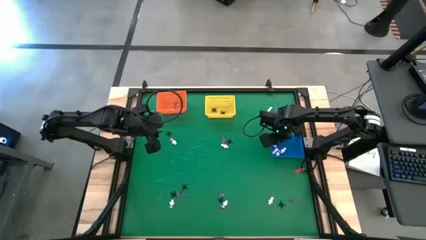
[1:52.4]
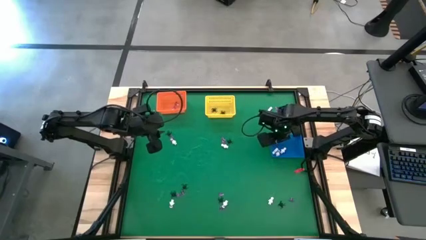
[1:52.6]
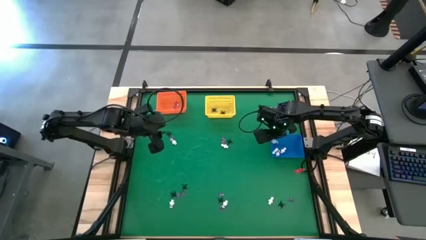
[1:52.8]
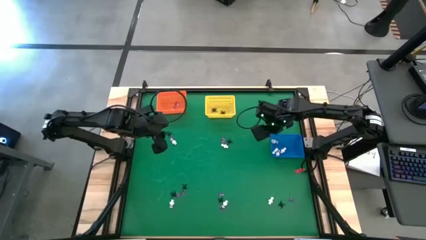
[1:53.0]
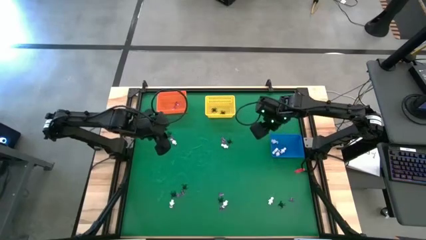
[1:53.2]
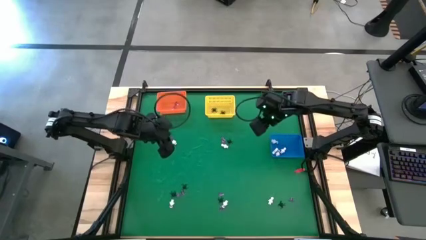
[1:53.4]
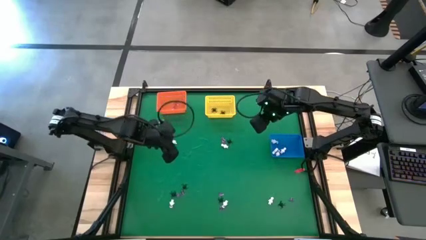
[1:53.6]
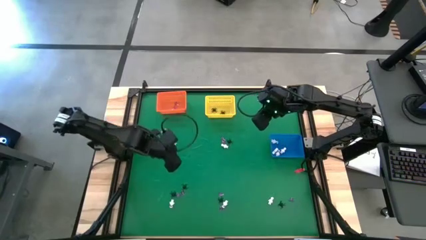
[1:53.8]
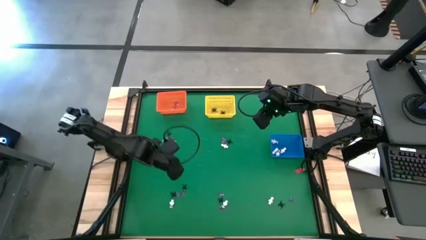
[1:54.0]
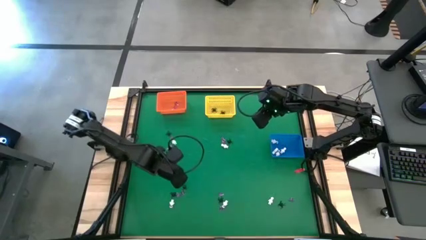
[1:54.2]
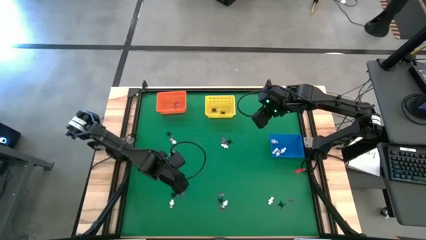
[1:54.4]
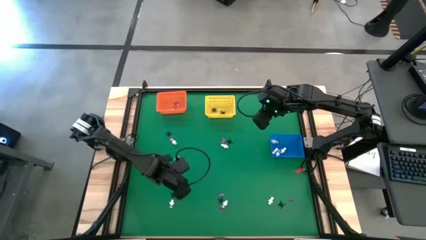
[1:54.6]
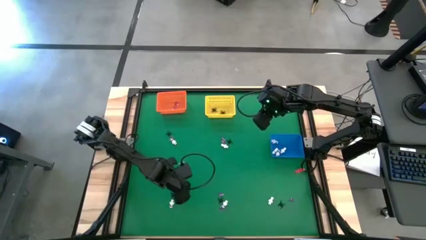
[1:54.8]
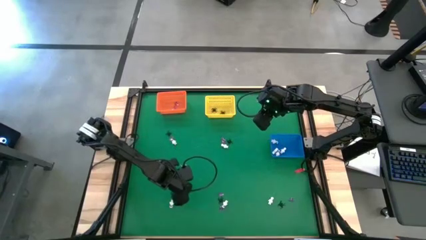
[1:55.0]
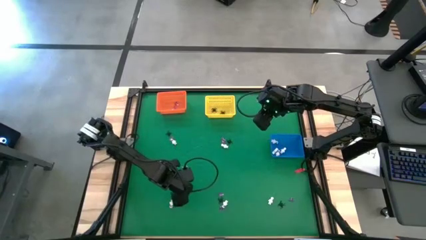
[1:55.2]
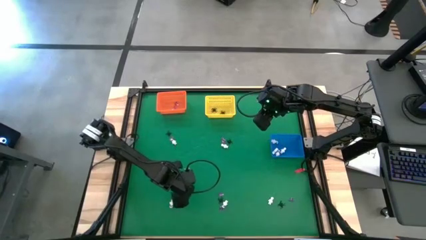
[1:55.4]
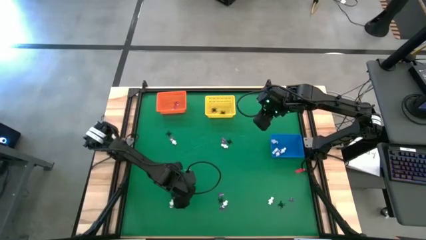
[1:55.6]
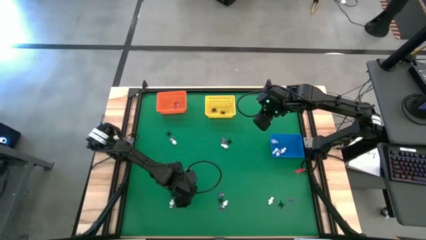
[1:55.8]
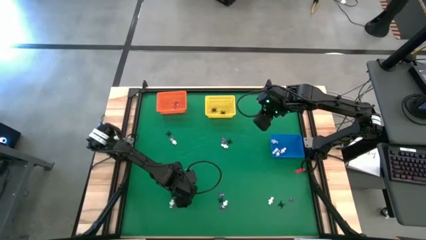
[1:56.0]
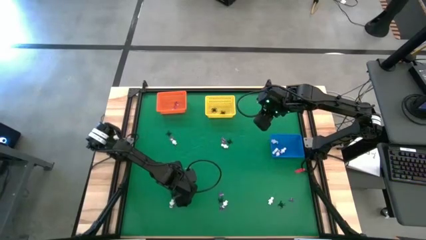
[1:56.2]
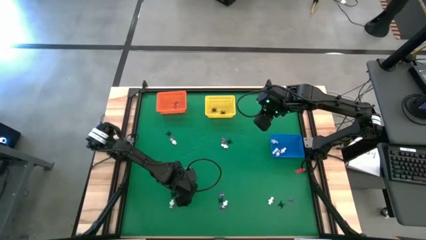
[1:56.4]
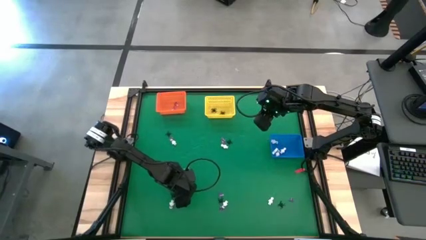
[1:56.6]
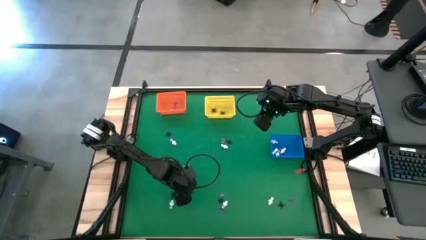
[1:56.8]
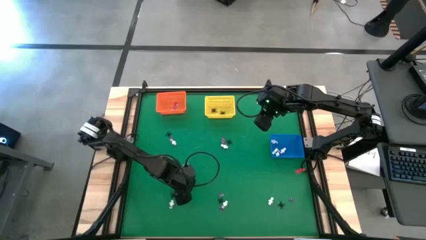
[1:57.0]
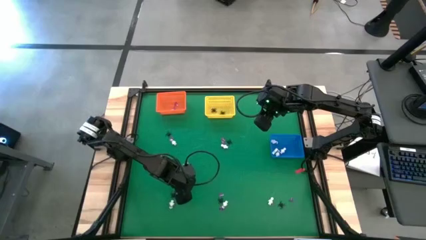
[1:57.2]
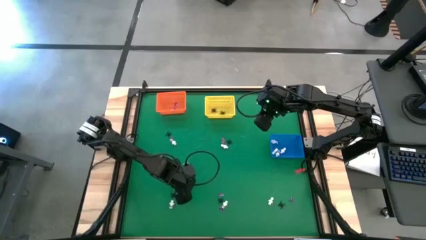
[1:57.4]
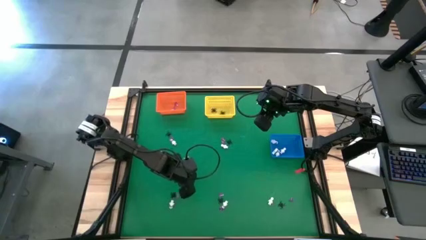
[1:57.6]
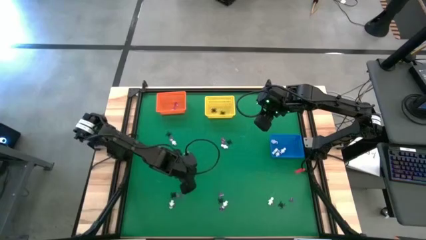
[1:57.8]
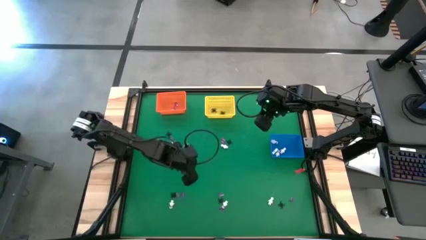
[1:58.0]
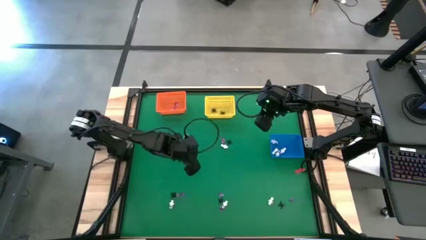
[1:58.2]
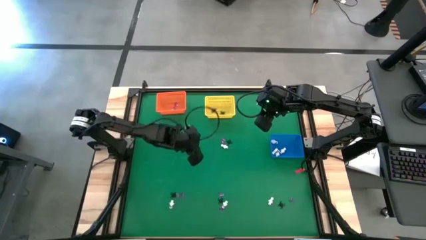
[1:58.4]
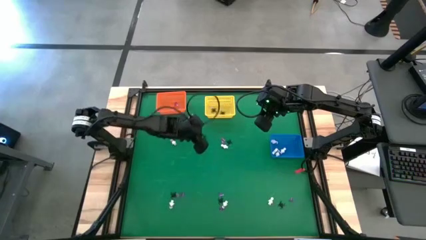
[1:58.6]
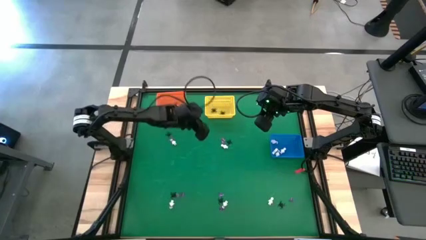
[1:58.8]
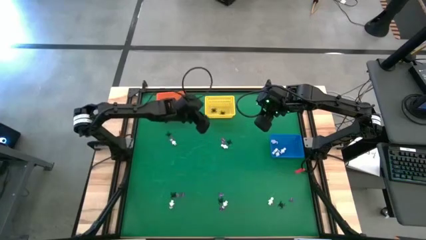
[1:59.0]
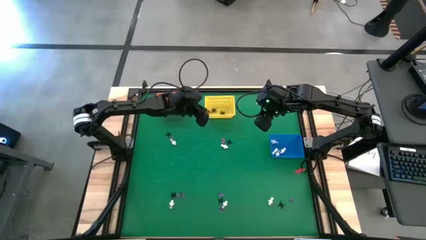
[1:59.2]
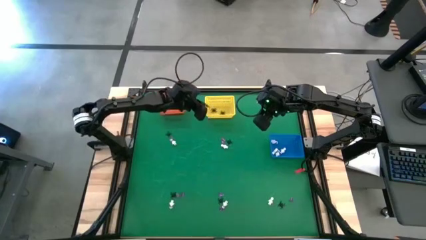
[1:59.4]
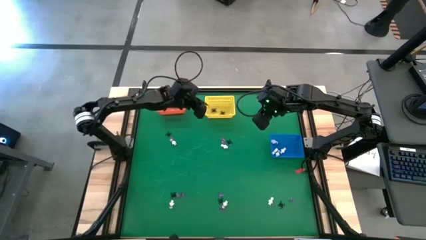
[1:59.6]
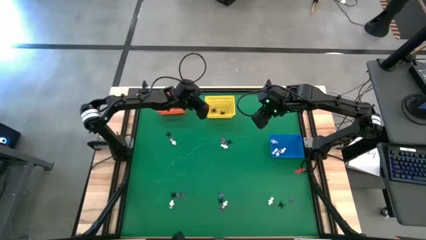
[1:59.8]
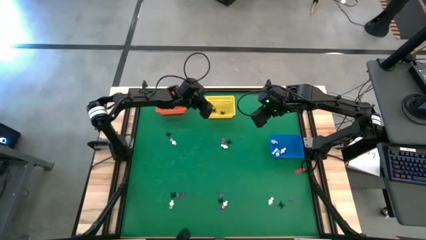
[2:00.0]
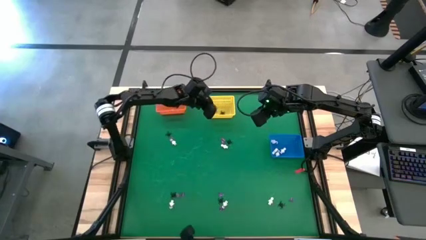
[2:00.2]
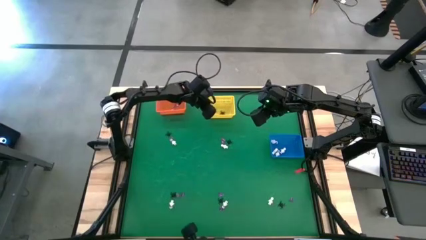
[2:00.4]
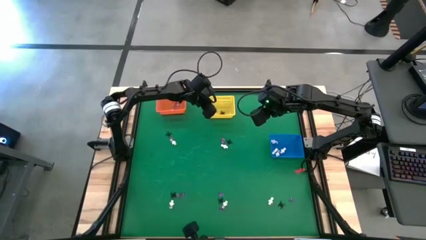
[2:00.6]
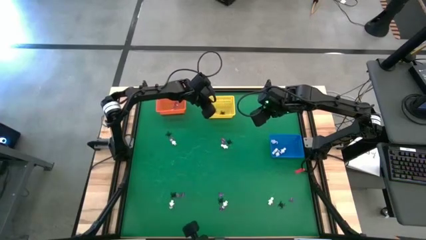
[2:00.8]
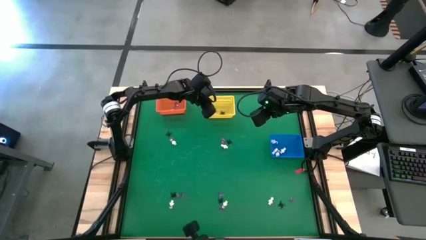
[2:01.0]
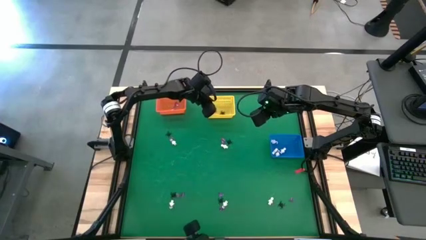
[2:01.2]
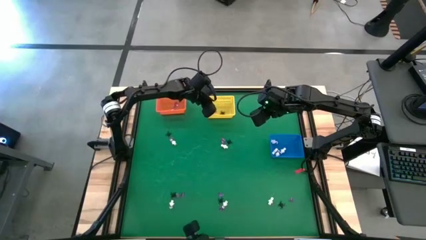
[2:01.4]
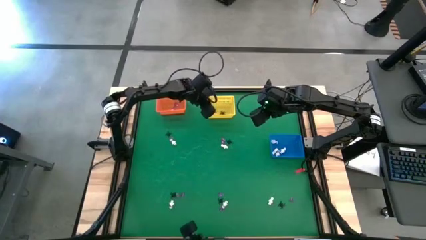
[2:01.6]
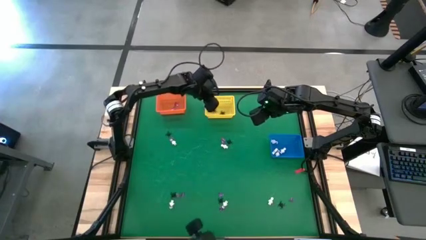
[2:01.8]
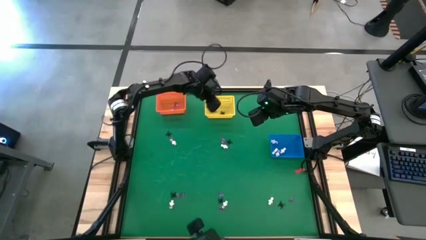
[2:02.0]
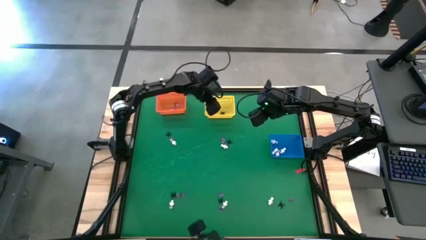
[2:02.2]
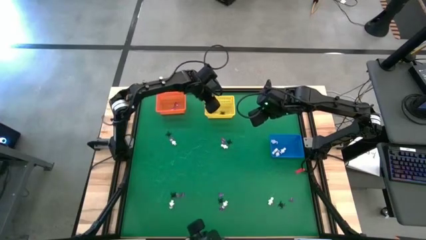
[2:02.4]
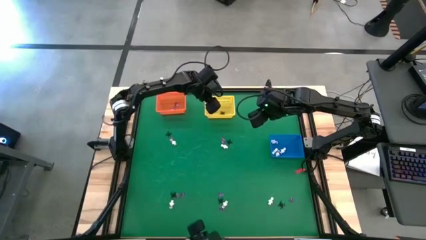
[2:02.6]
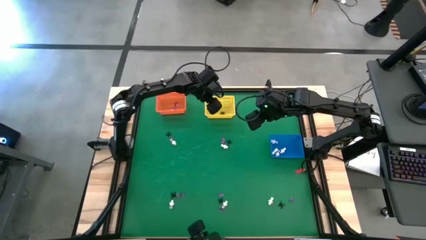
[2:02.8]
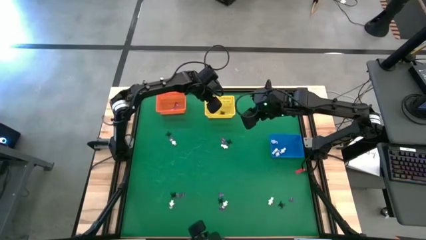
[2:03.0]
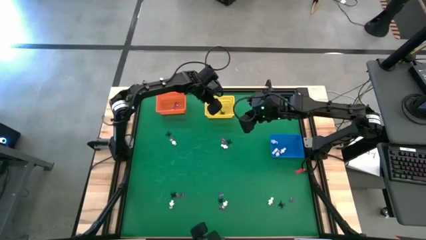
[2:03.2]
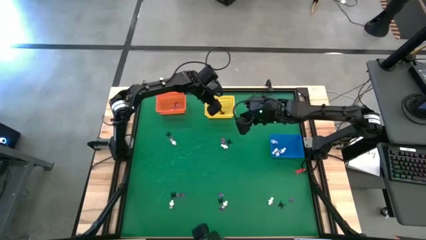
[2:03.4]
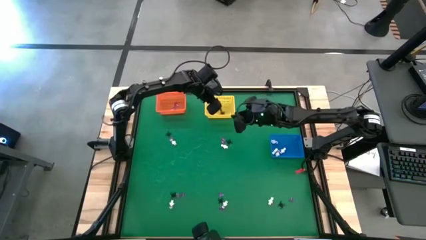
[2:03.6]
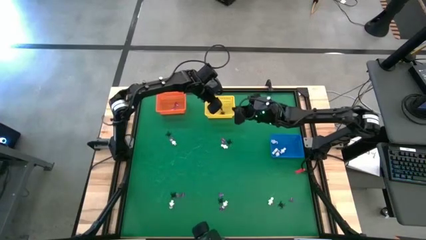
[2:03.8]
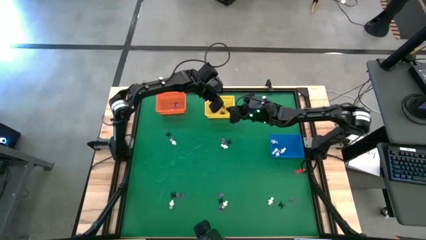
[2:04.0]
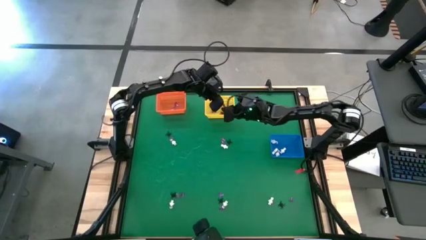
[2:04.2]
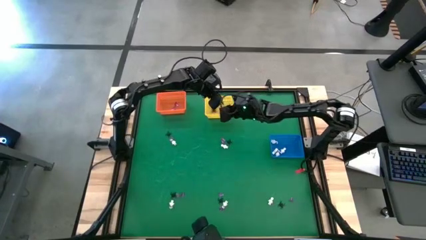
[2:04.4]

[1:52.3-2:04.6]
Task: Sort Halloween decoration
Put the black spider toy into the yellow basket

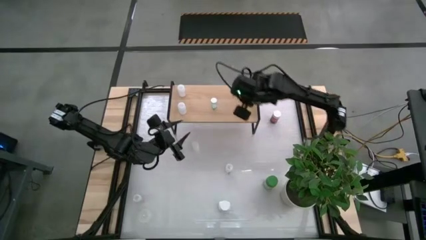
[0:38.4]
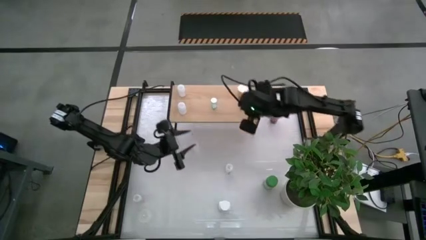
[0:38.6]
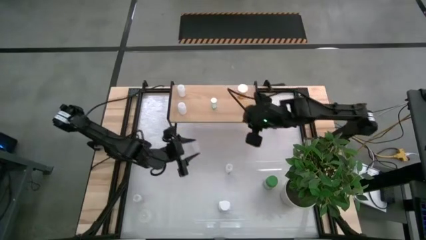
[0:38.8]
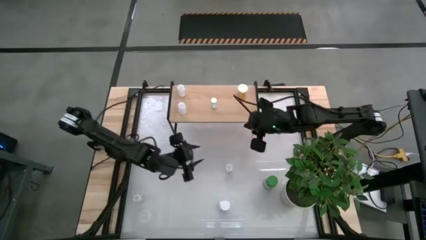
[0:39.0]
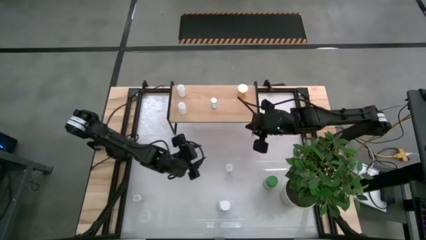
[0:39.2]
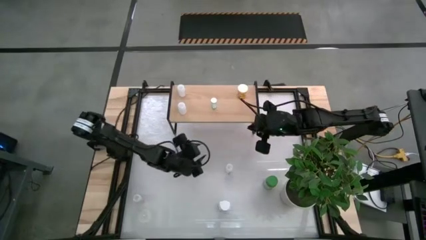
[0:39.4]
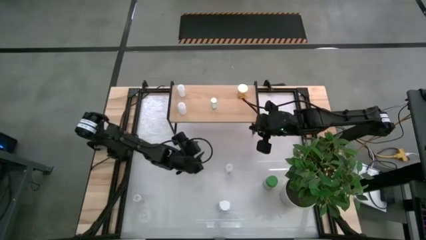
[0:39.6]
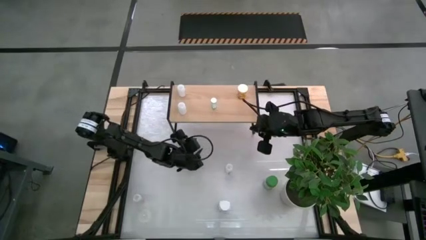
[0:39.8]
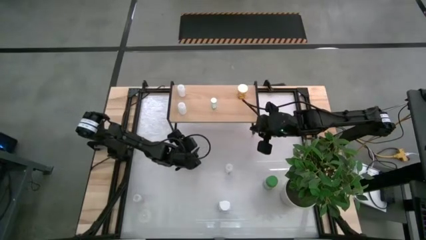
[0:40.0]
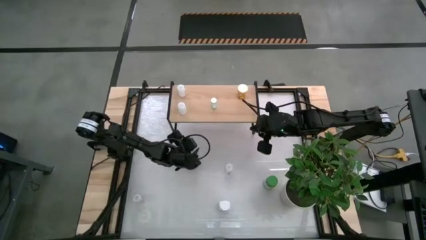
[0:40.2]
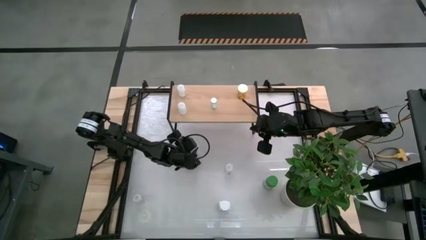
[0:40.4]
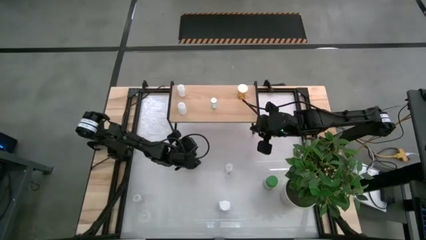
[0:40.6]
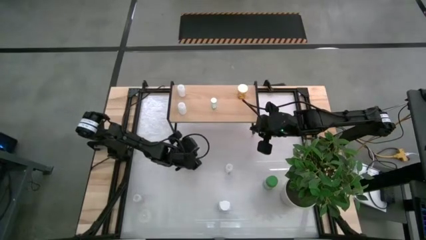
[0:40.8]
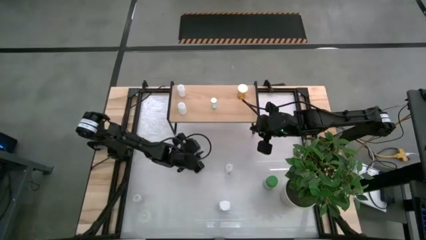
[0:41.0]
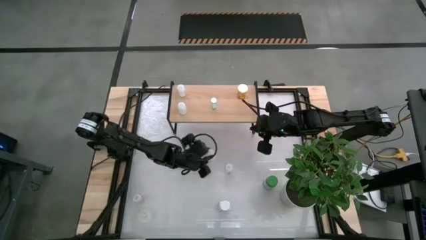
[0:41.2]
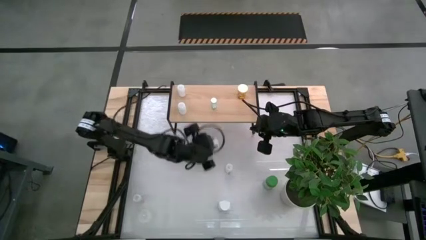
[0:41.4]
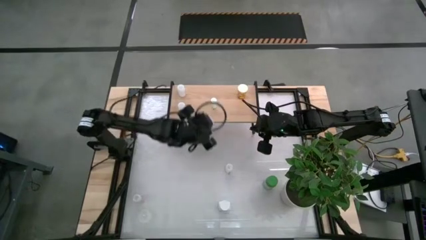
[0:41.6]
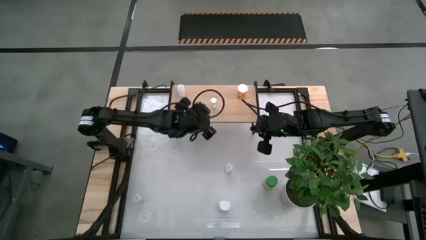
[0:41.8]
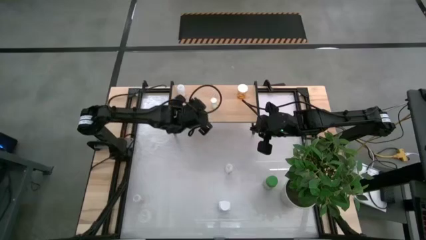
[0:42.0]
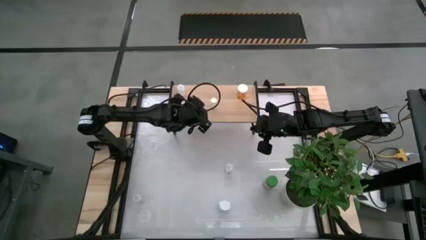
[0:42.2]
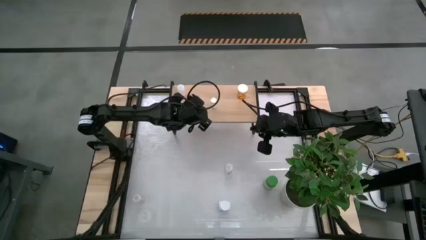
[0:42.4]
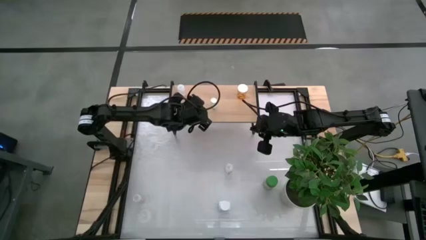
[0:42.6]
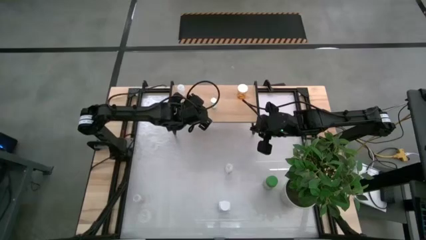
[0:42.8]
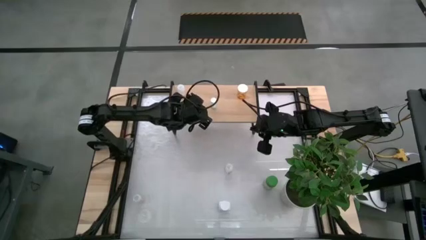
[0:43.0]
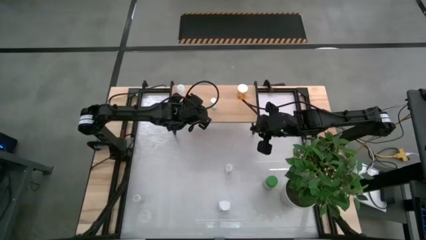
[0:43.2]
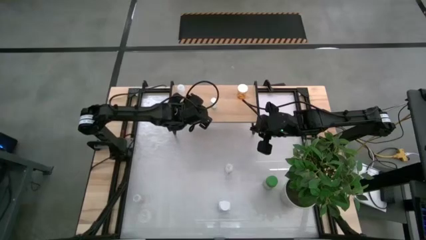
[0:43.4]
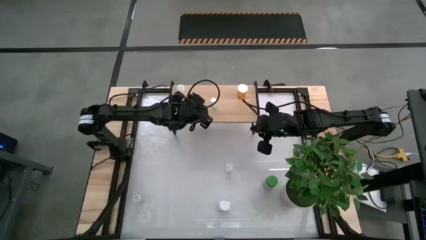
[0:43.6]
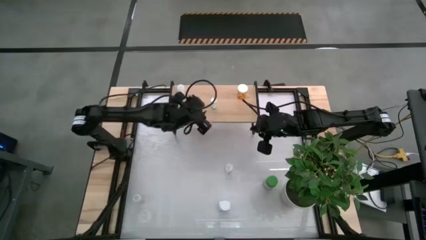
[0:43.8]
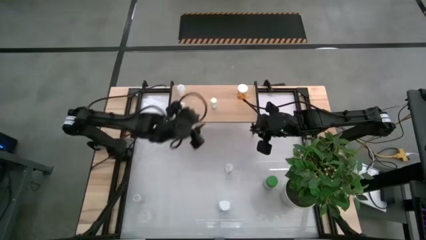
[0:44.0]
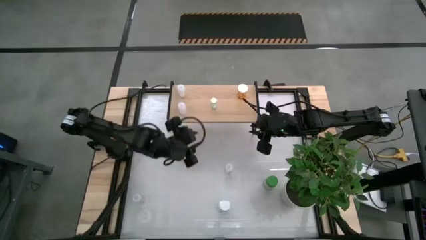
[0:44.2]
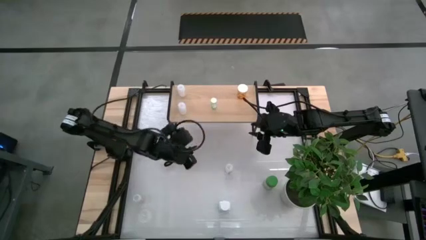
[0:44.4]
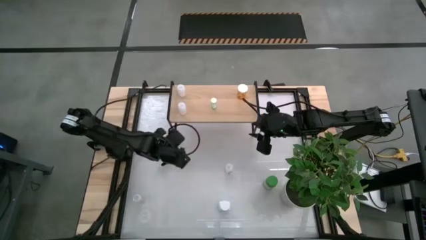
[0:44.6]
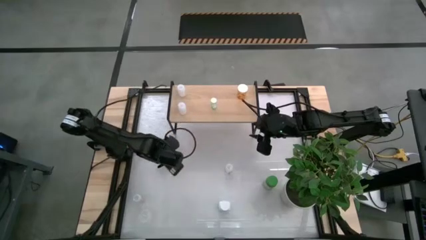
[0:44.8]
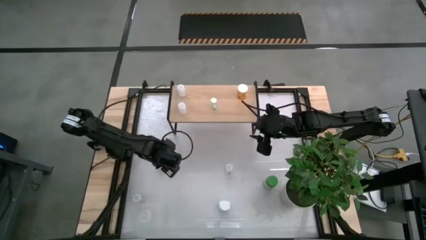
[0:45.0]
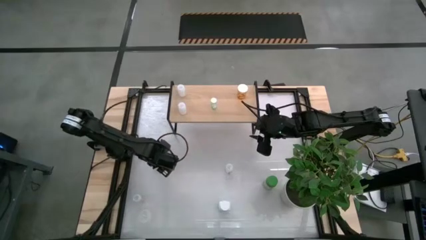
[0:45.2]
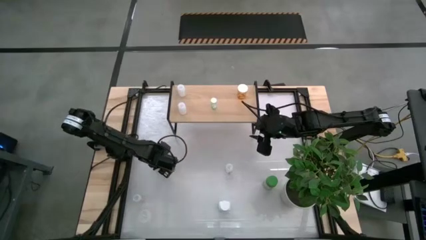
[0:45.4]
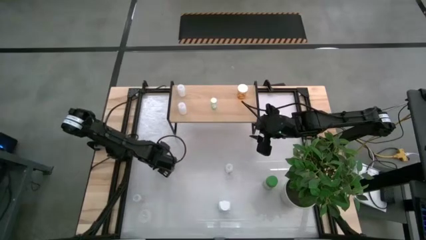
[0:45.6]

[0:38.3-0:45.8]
Task: Pick and place medicine bottles onto shelf by color
Put the white pill bottle on the shelf
